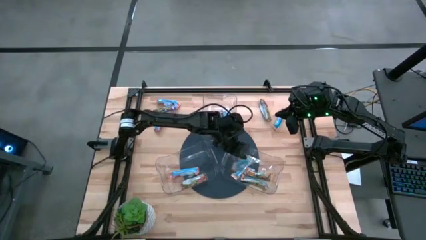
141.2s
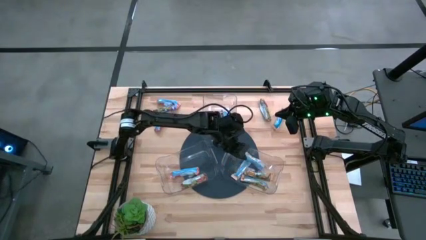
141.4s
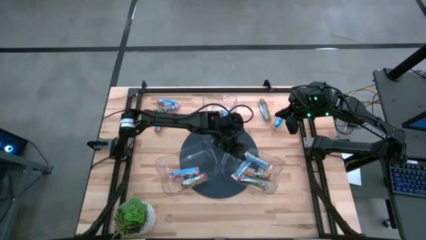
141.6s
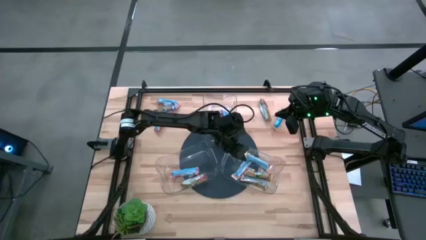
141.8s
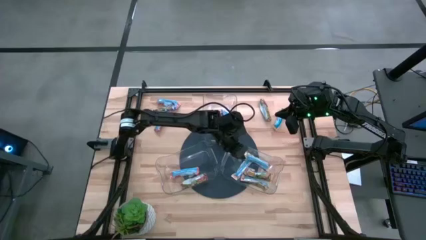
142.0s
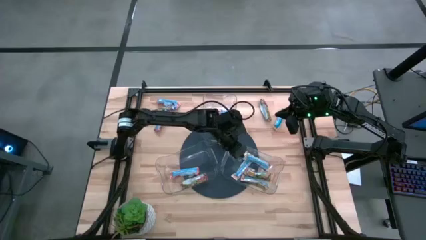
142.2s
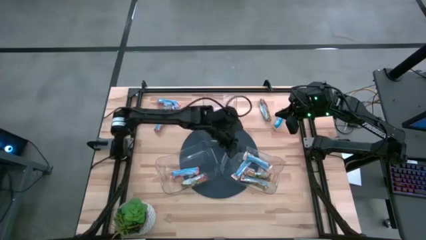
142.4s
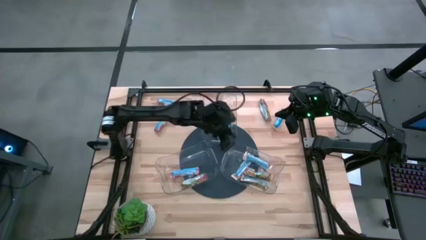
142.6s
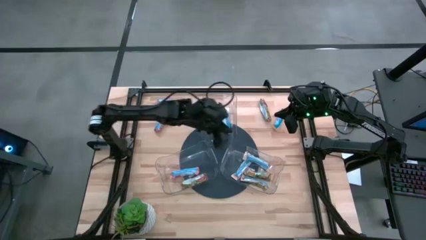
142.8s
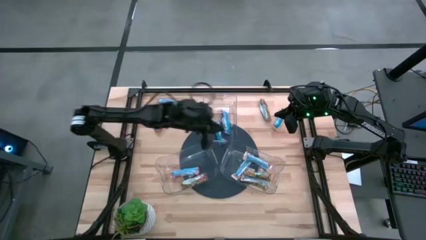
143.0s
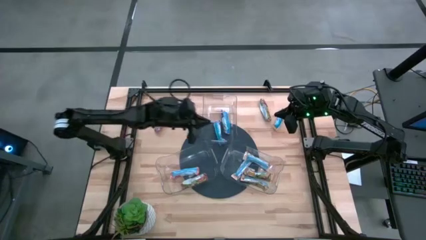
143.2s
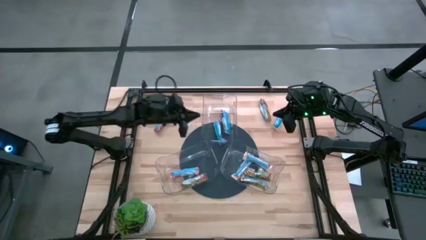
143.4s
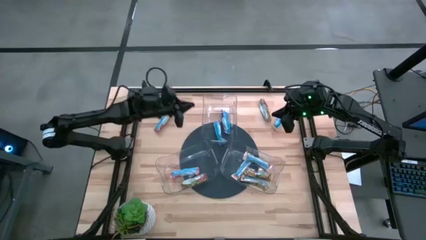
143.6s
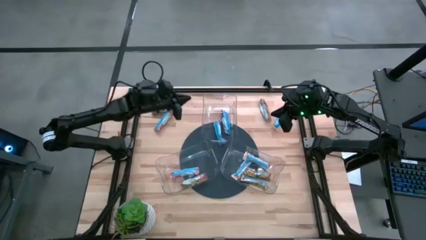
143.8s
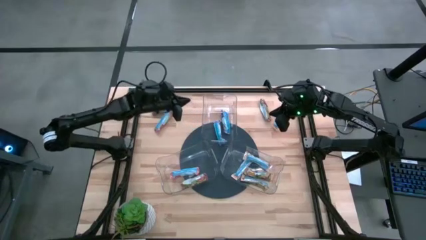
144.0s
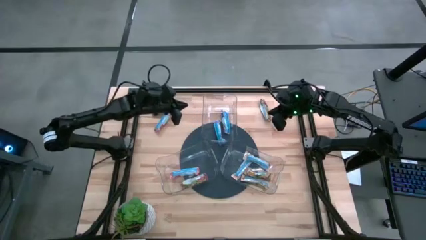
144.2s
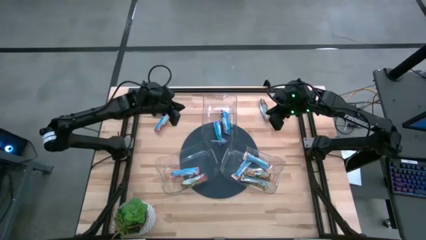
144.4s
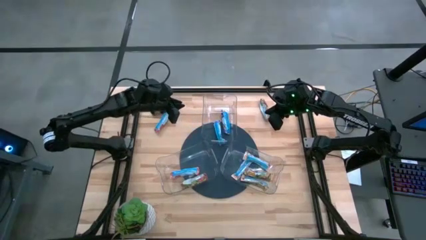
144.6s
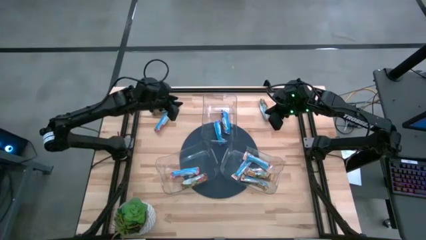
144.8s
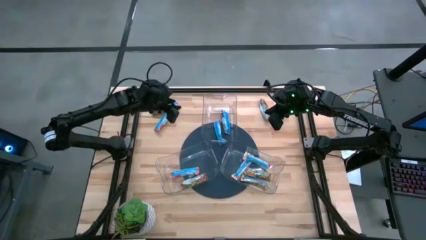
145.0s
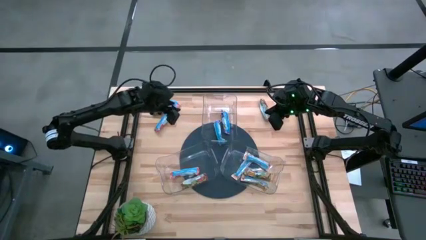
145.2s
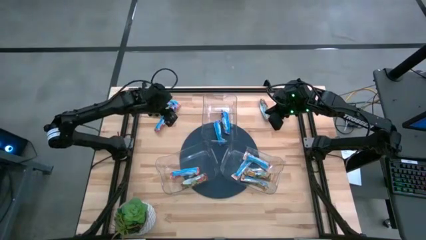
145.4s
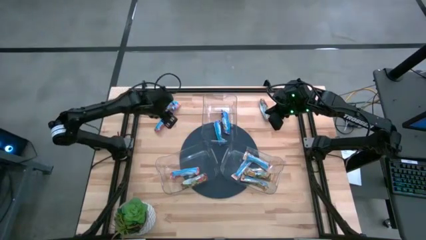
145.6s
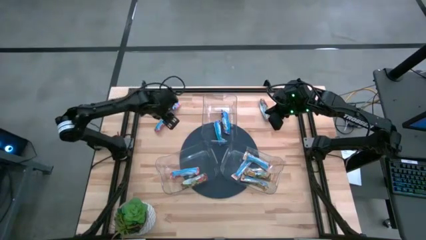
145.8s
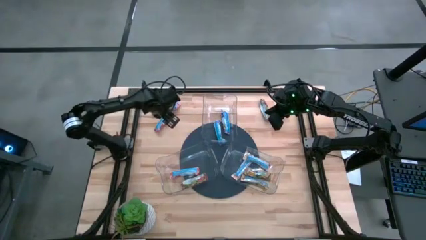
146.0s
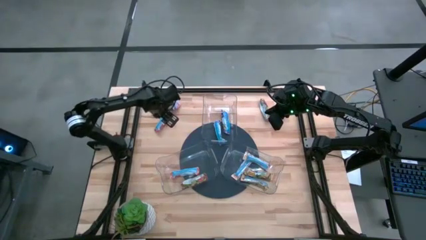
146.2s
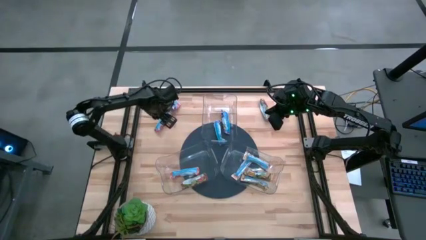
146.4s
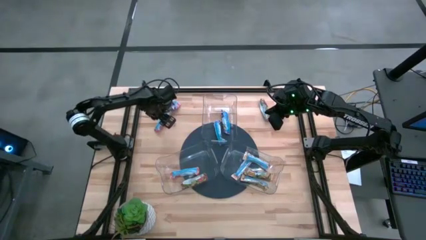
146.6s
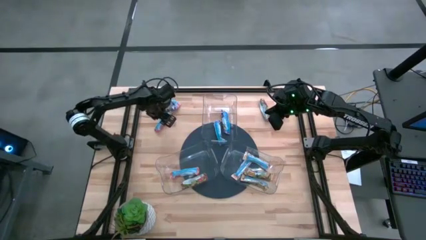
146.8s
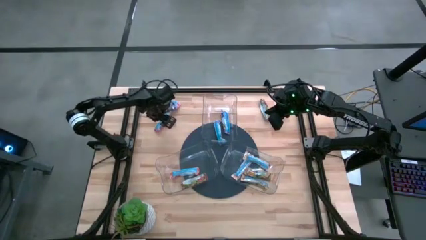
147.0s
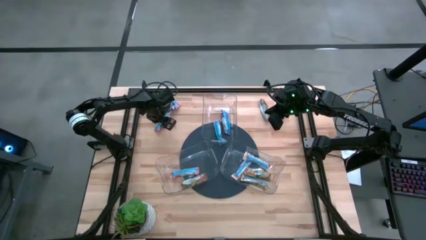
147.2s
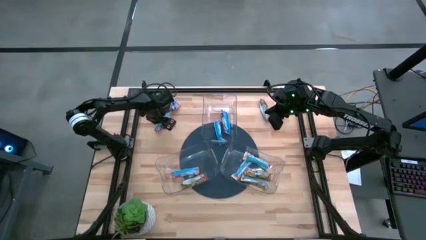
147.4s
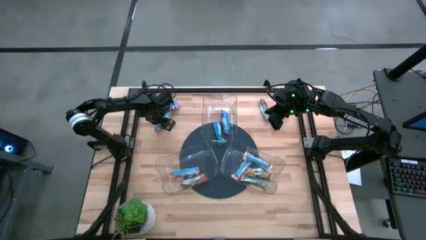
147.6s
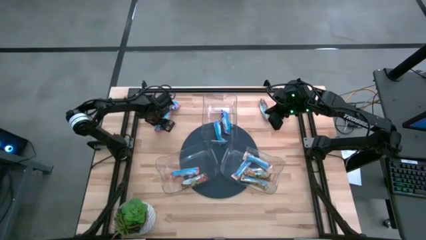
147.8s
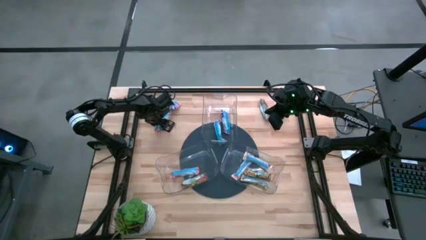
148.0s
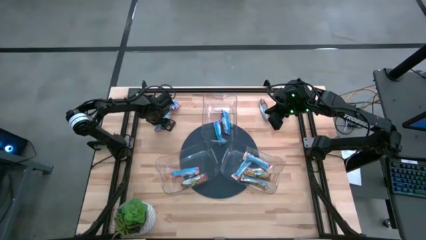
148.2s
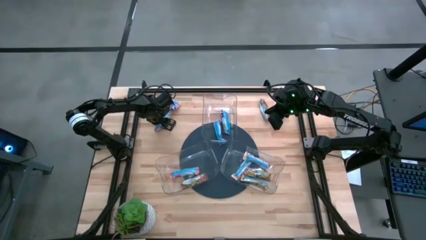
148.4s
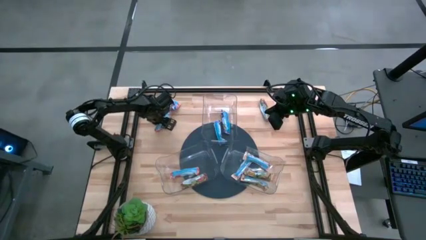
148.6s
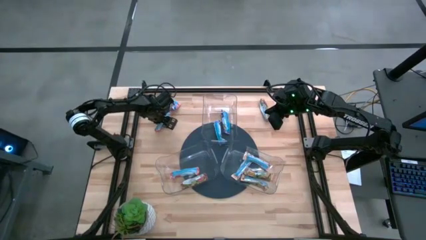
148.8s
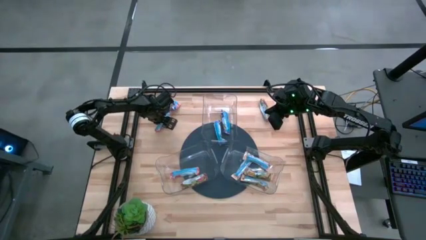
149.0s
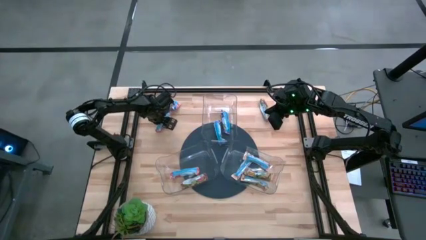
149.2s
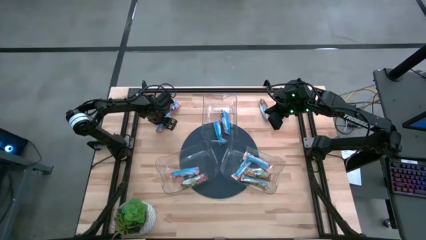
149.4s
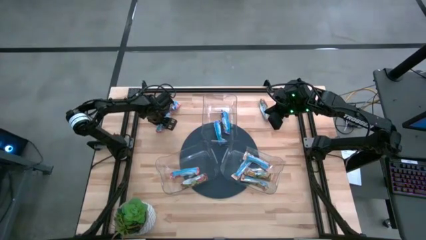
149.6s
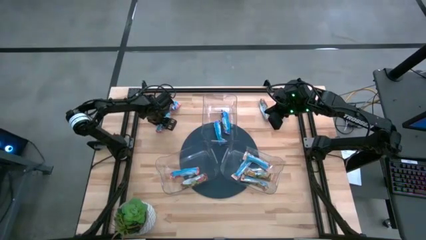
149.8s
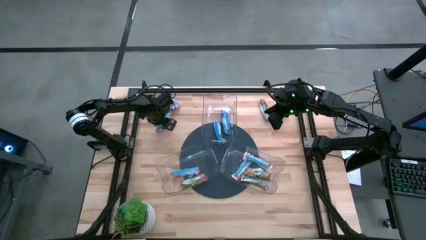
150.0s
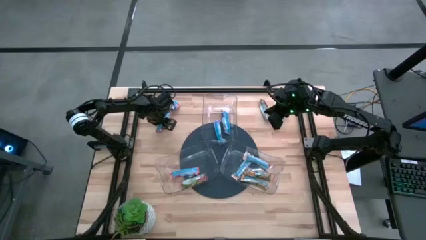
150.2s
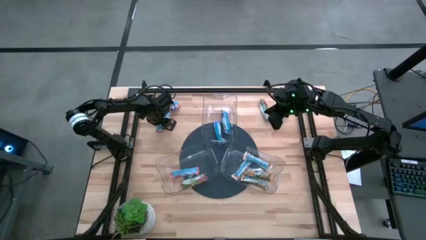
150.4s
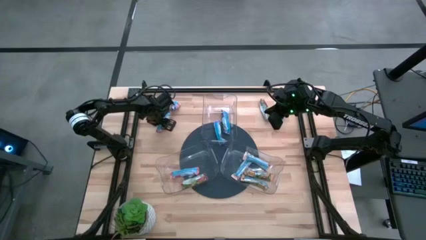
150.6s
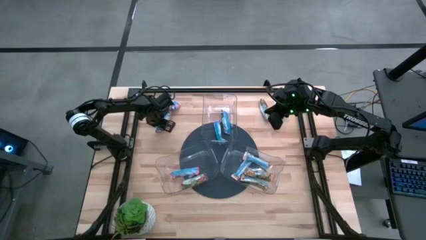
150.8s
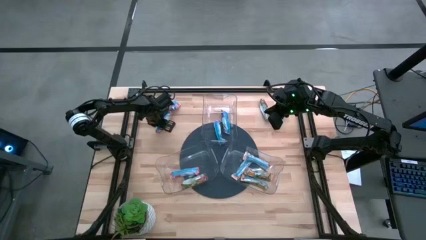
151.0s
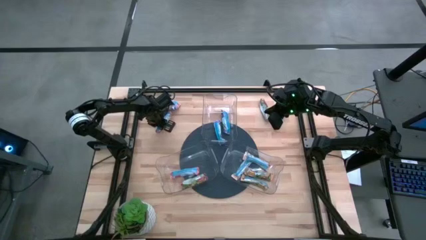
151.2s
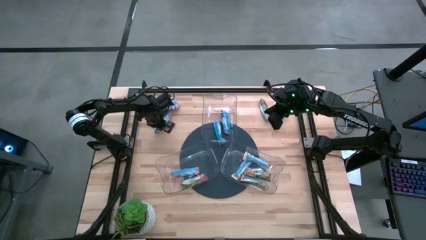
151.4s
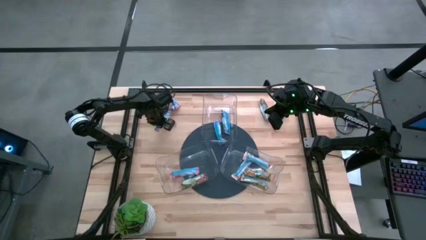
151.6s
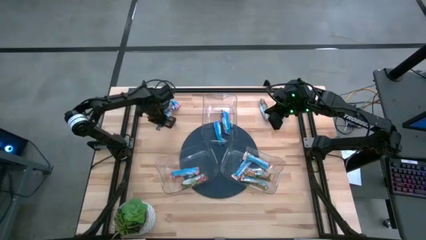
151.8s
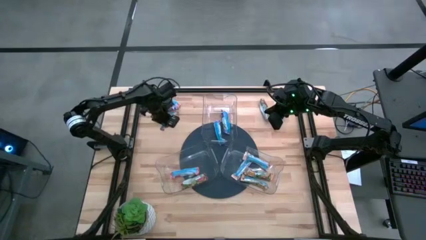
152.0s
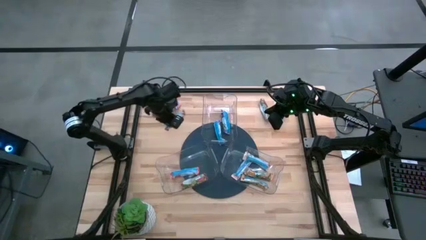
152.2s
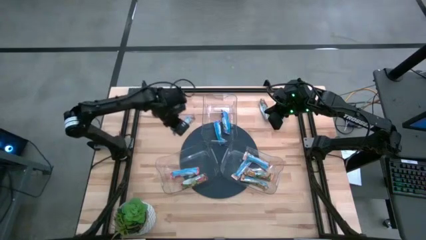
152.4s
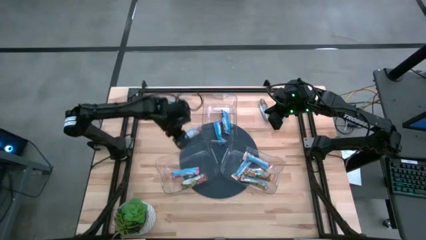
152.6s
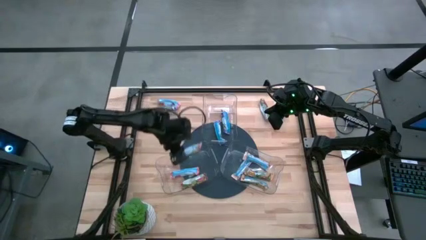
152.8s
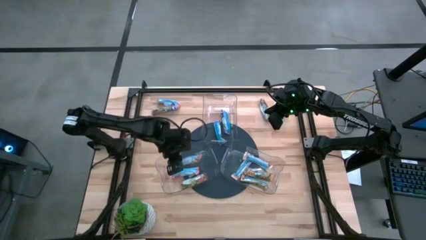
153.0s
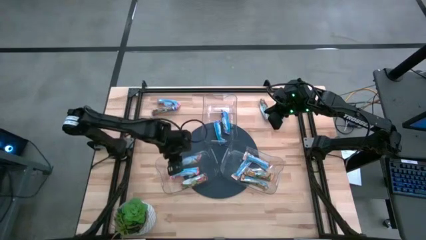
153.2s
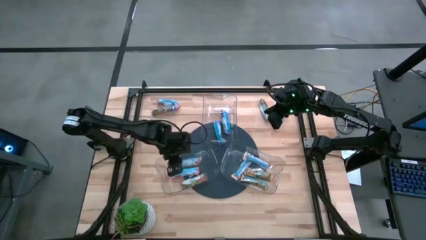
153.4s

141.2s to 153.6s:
Task: Pick and place Granola Bars by type
Put the red granola bar into the left transparent bin

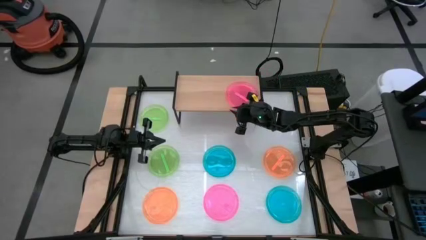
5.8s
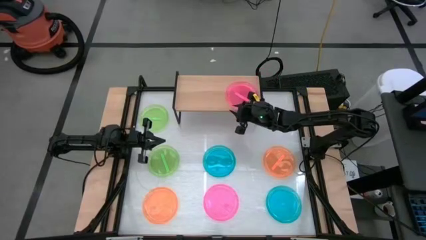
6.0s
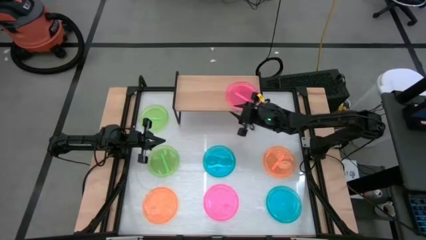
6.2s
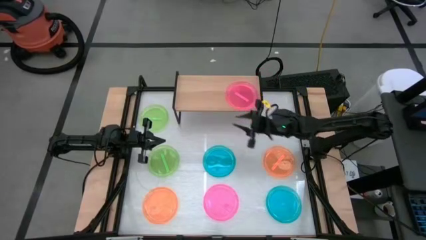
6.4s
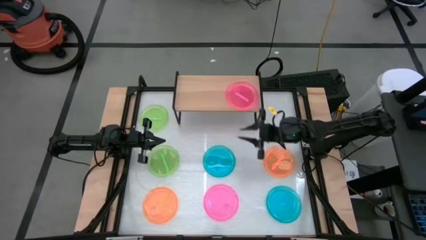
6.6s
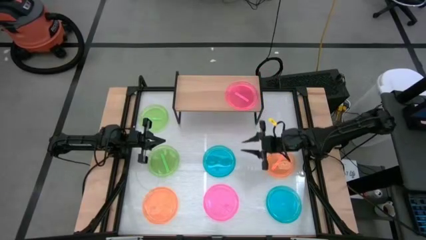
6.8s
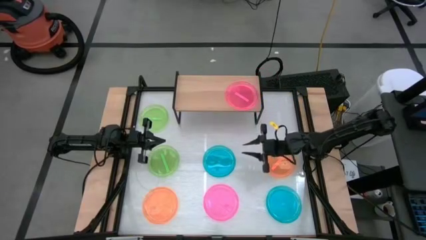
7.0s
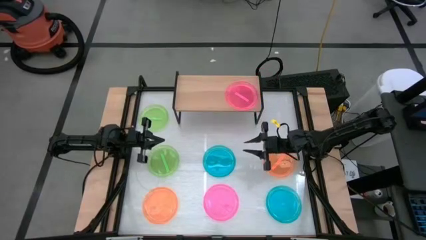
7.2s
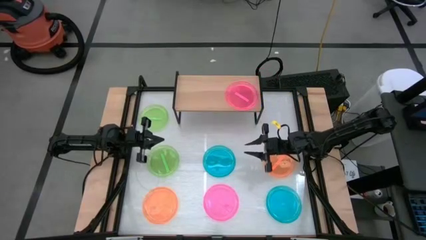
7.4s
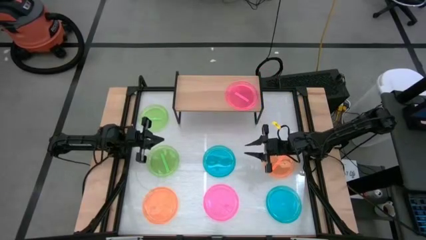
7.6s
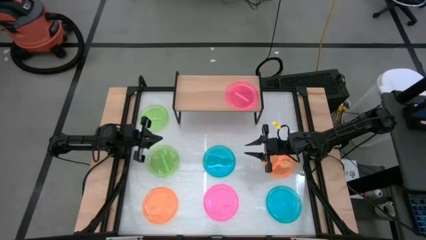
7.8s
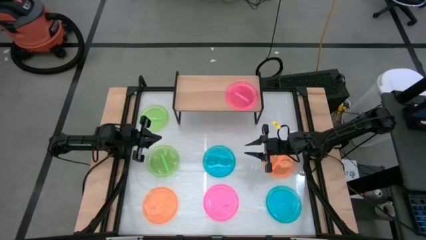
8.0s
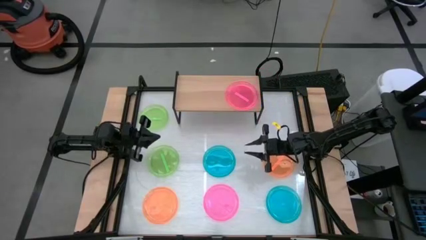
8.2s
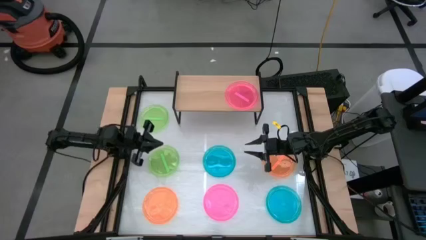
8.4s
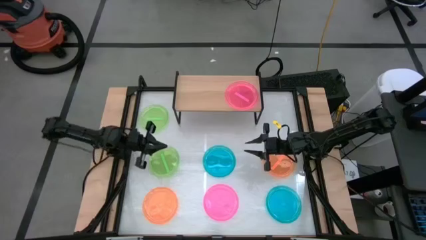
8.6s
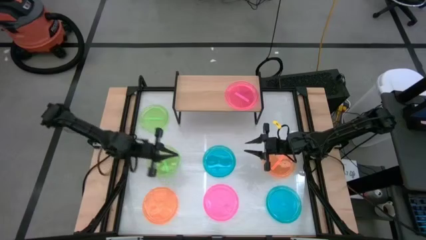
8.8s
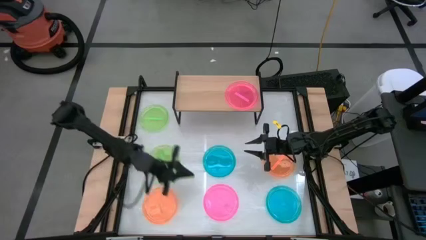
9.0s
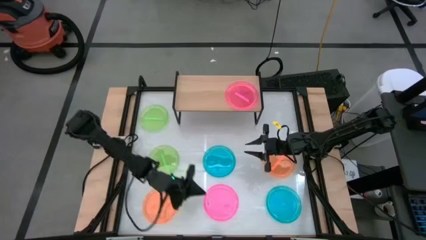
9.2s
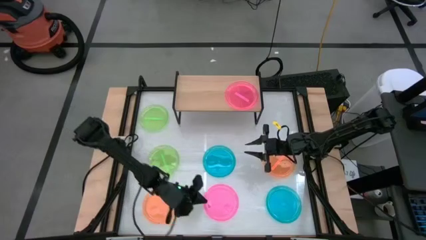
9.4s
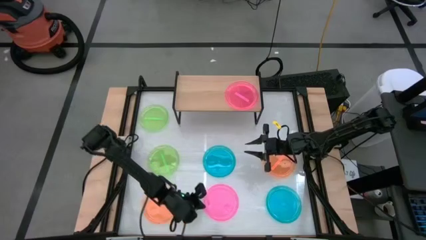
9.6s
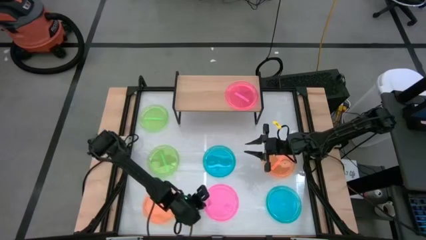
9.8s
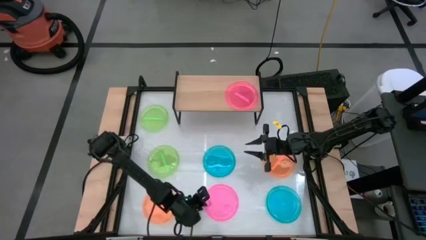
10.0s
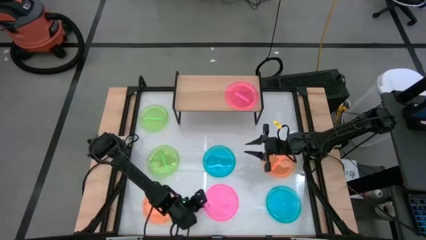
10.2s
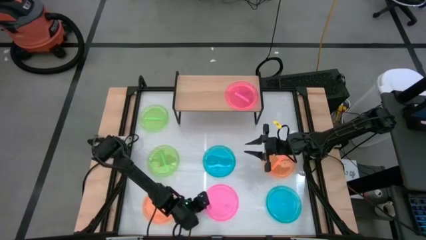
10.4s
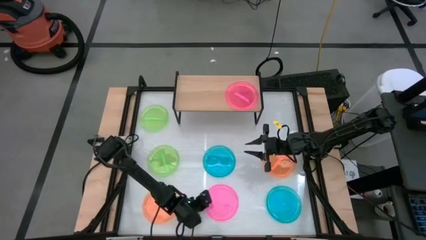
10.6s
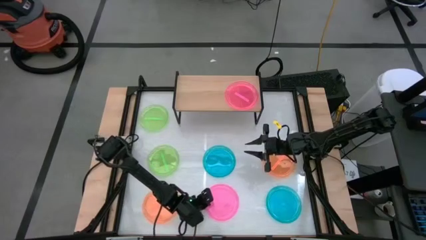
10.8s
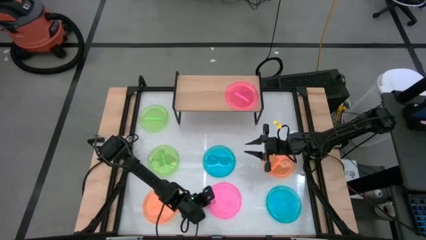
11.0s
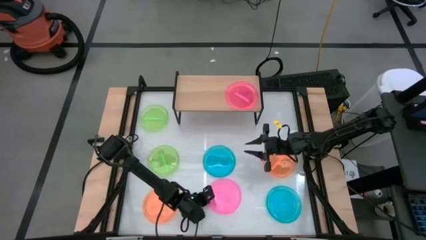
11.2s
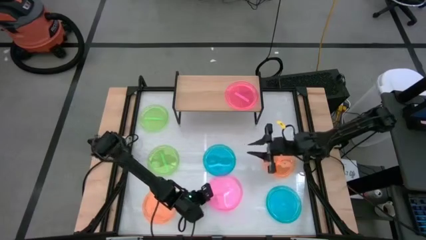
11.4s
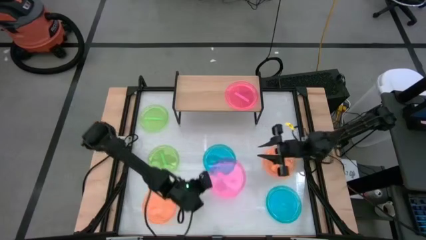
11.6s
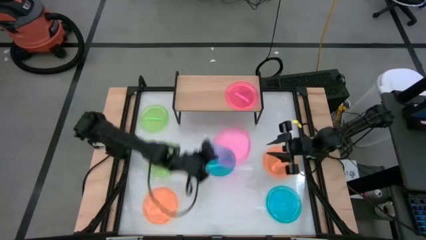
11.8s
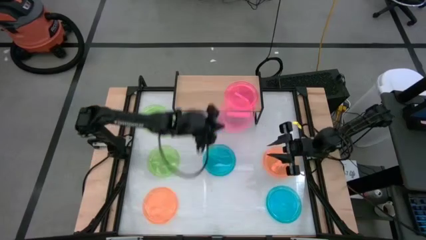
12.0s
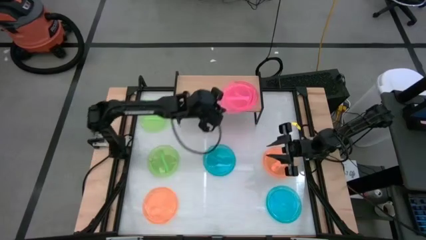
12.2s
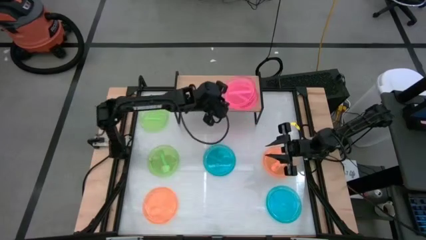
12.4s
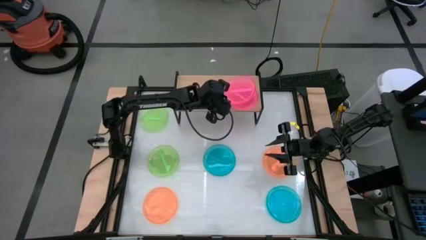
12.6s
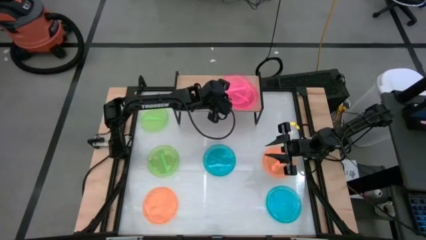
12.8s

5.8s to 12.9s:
Task: Place and stack plates onto a shelf
Stack the pink plate on top of the pink plate on the shelf
